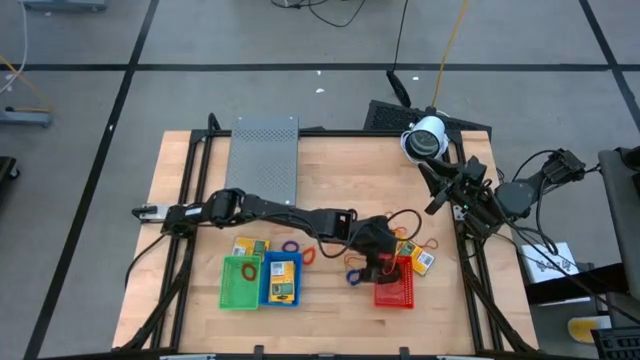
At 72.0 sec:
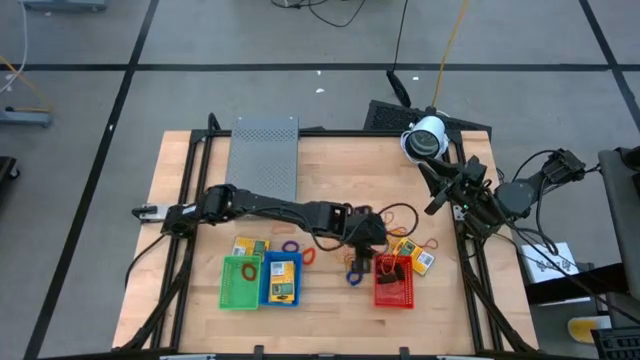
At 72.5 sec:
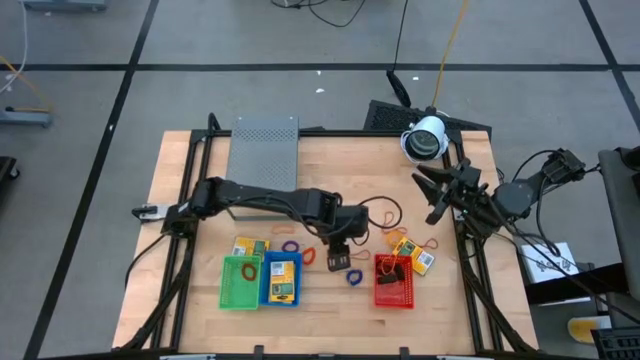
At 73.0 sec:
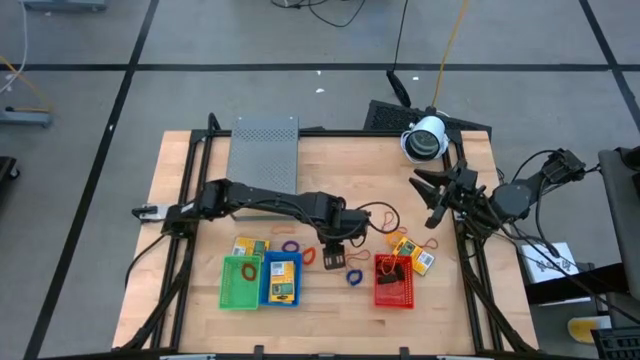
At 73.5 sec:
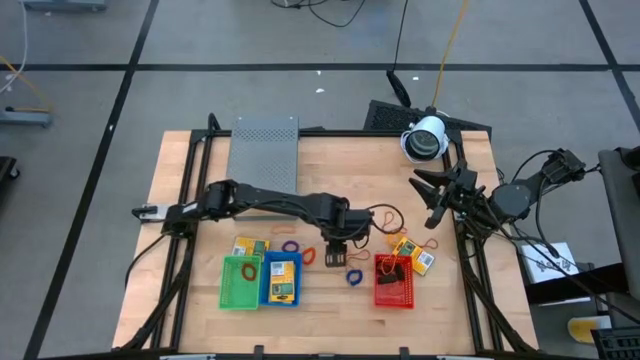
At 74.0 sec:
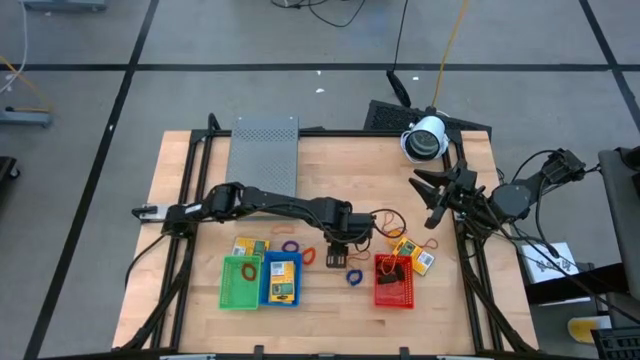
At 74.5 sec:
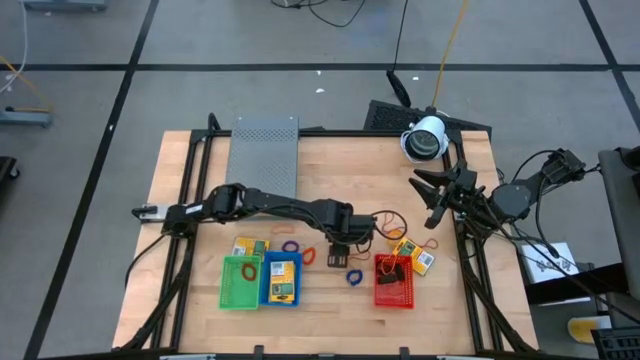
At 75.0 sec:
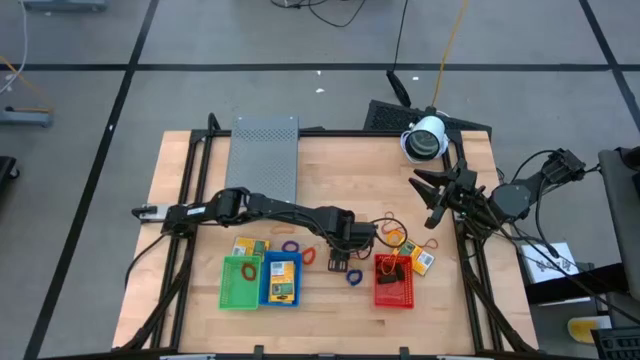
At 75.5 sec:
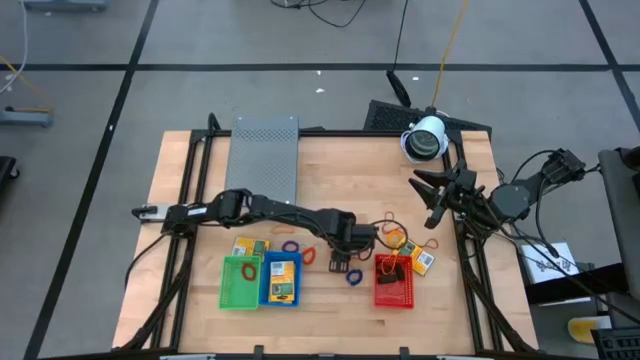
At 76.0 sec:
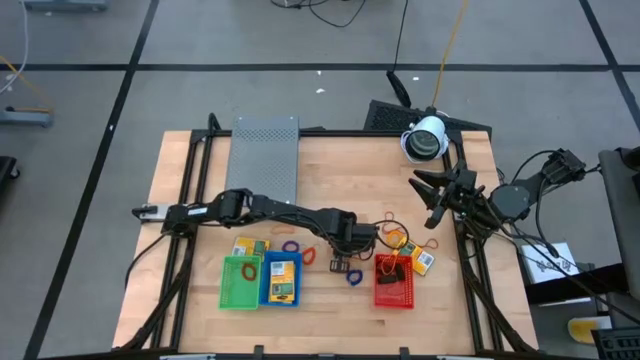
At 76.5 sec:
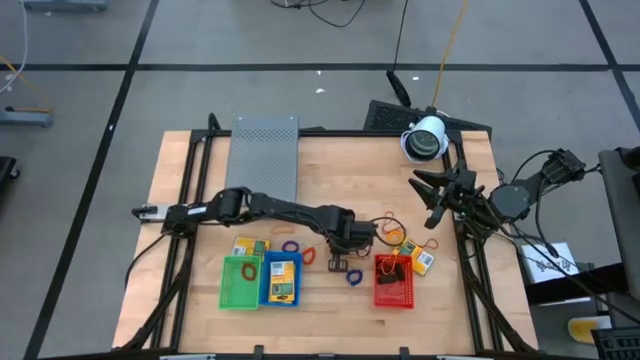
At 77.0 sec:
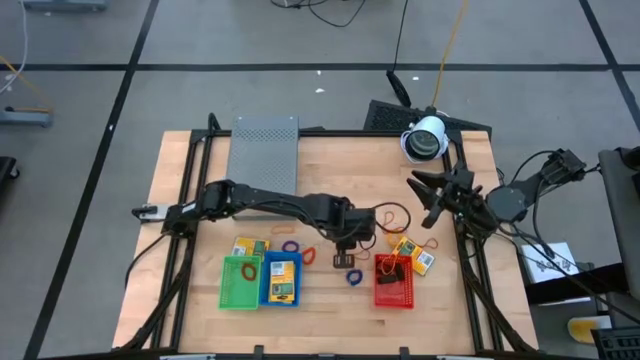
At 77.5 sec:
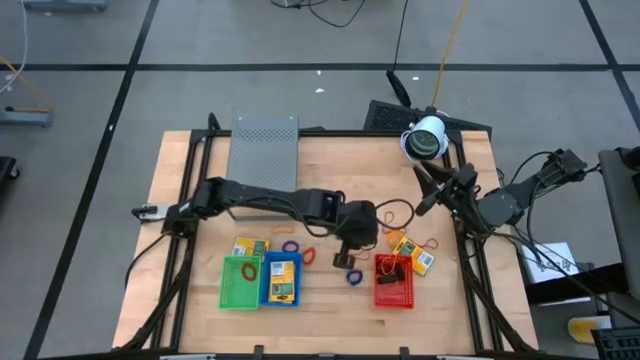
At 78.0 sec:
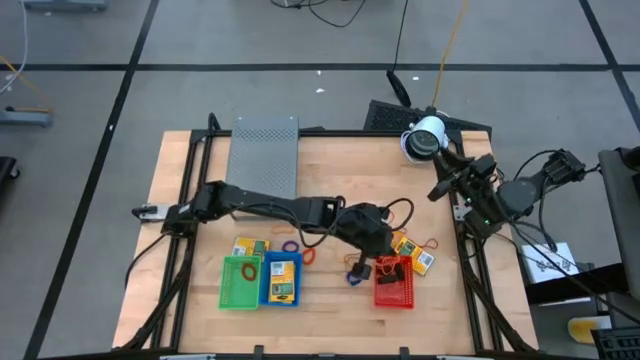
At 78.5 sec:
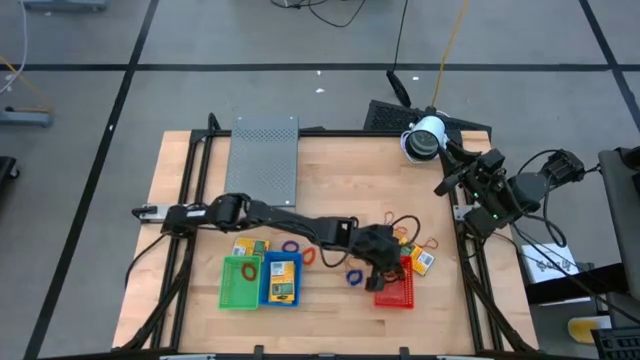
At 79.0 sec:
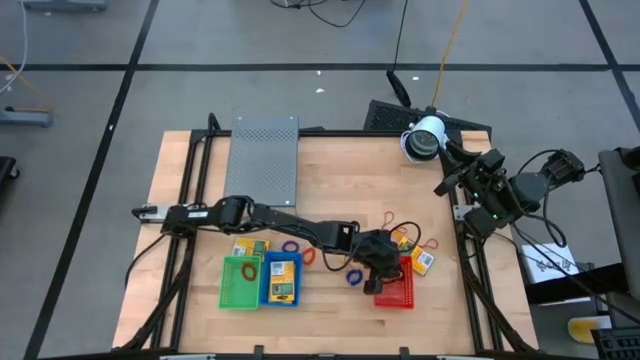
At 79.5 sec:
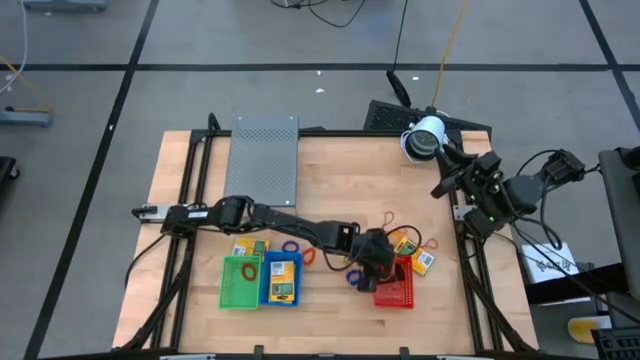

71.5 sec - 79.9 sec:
Task: Pick & Place Office Desk Supplies
Put the orange rubber band into the red bin

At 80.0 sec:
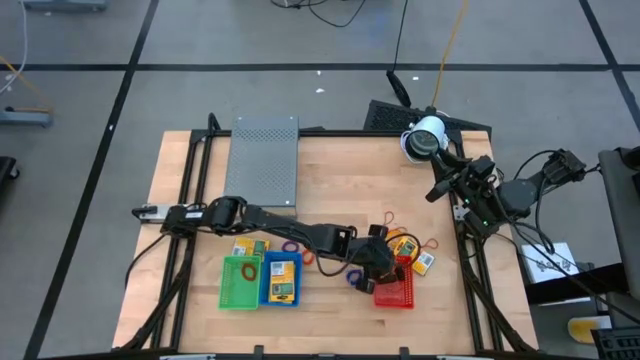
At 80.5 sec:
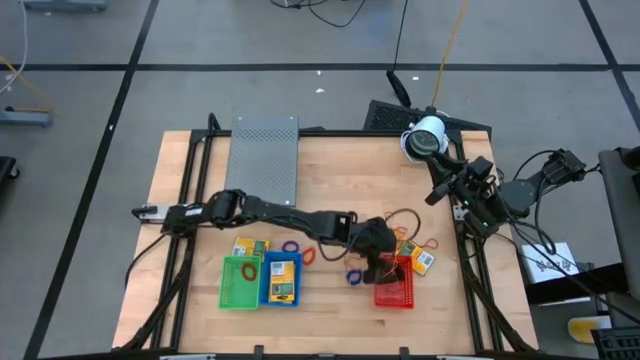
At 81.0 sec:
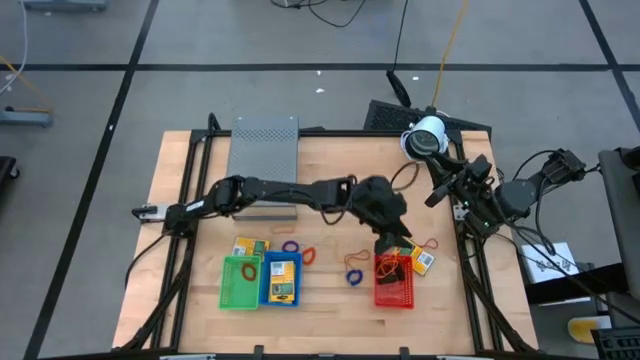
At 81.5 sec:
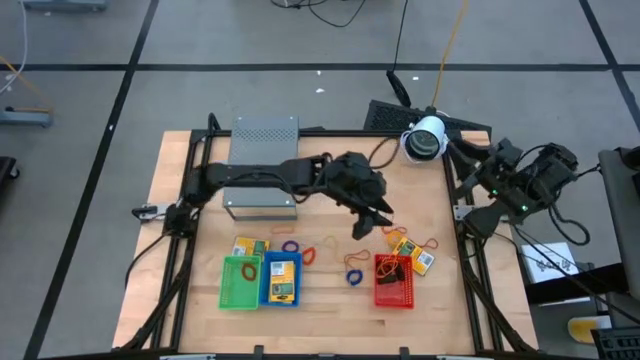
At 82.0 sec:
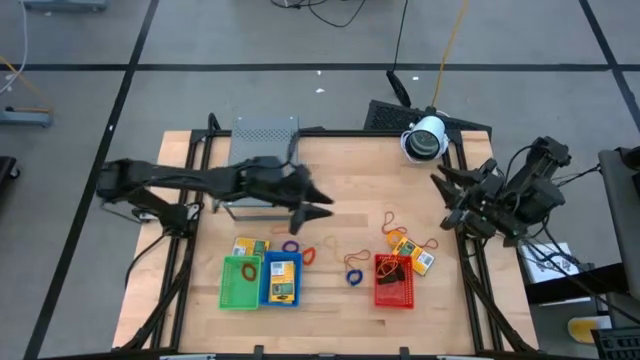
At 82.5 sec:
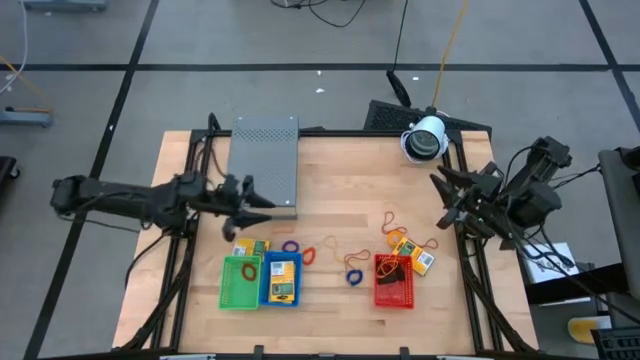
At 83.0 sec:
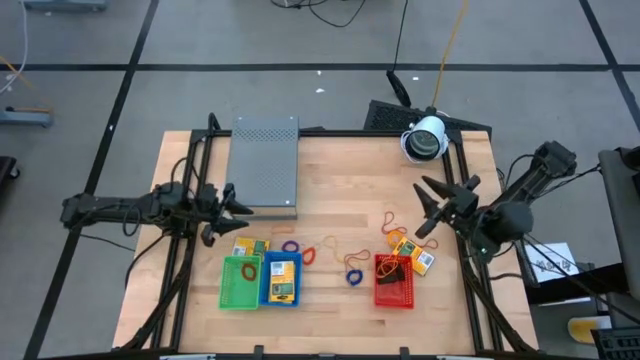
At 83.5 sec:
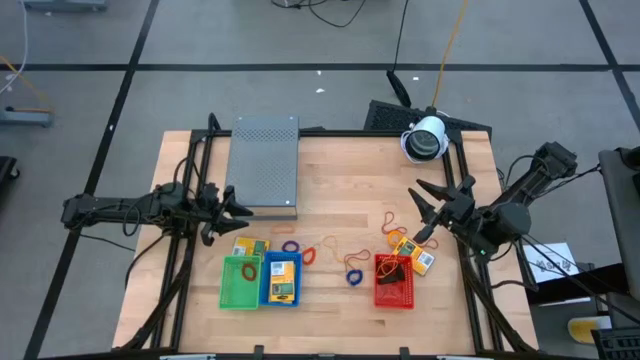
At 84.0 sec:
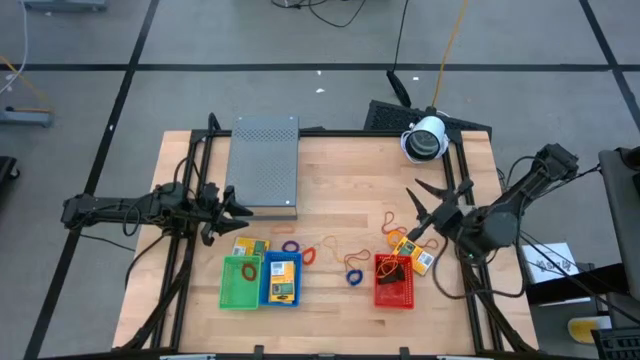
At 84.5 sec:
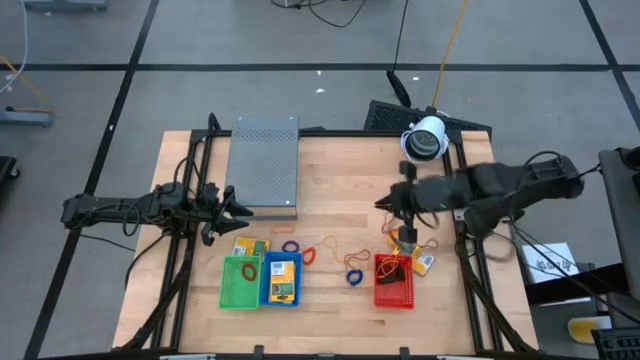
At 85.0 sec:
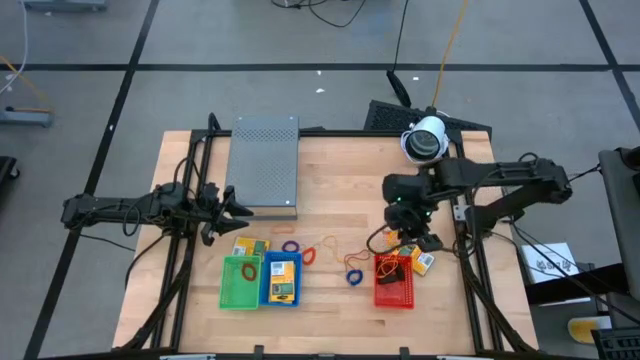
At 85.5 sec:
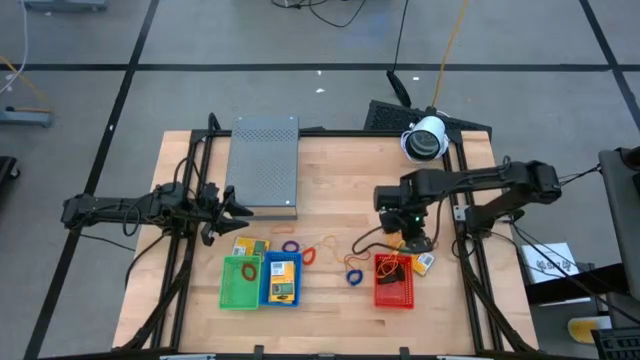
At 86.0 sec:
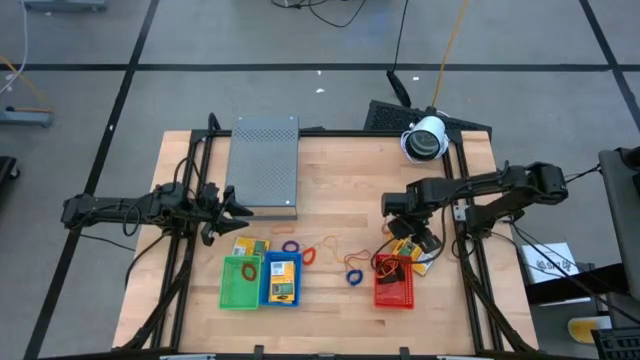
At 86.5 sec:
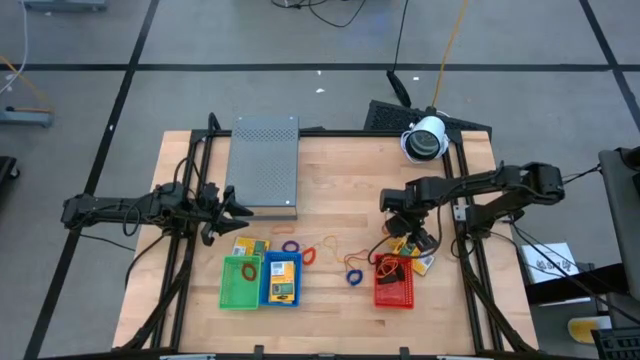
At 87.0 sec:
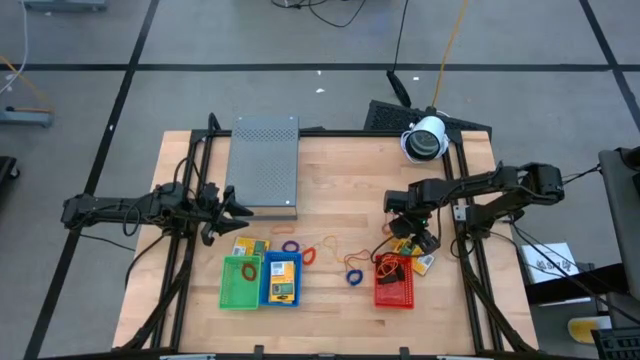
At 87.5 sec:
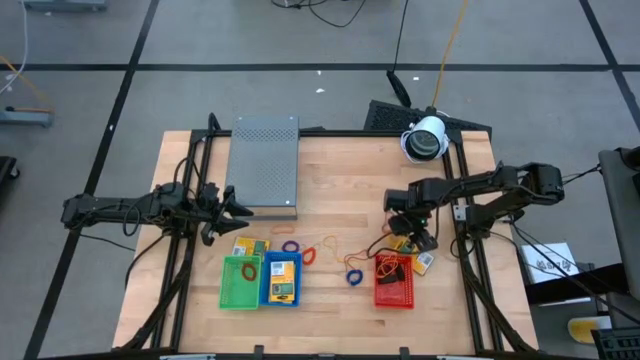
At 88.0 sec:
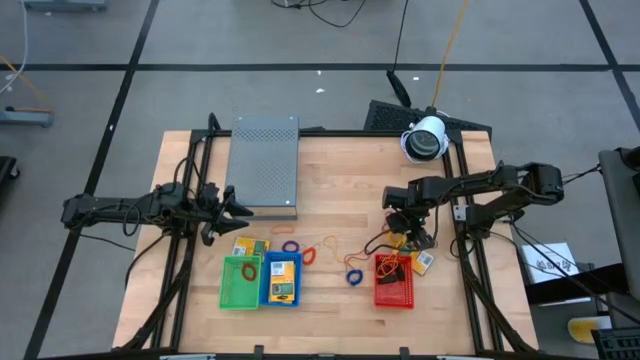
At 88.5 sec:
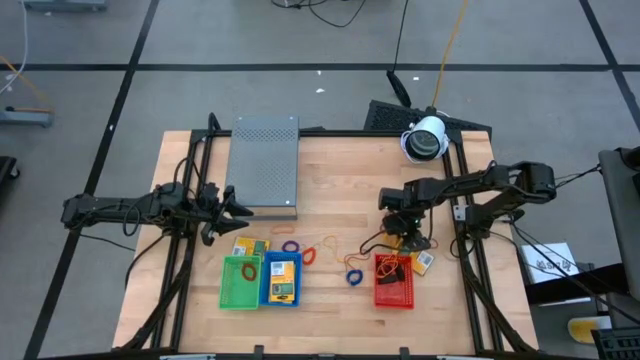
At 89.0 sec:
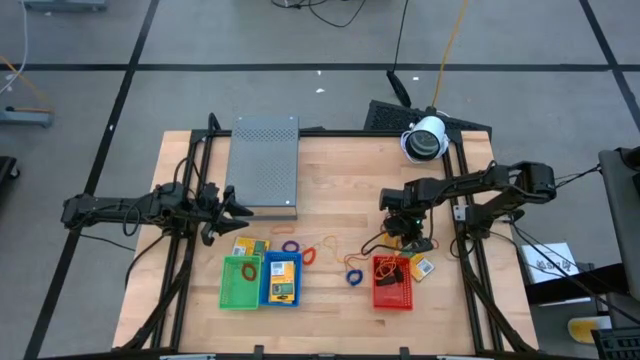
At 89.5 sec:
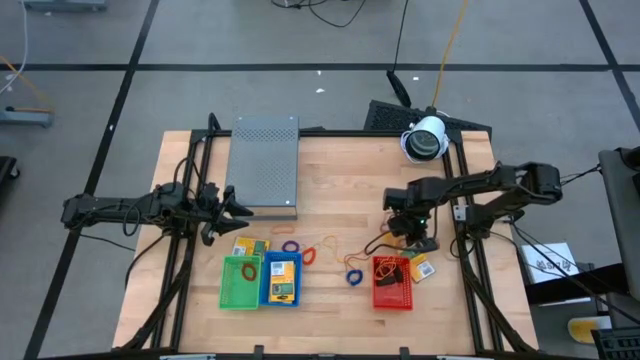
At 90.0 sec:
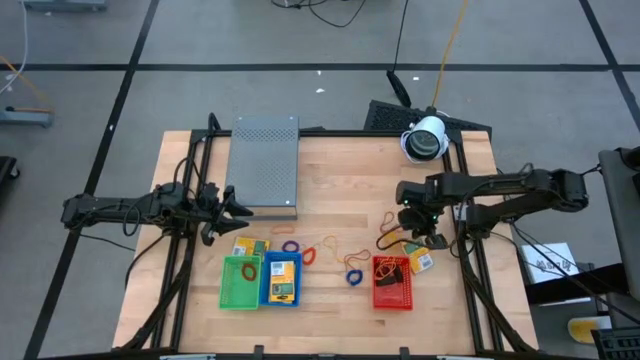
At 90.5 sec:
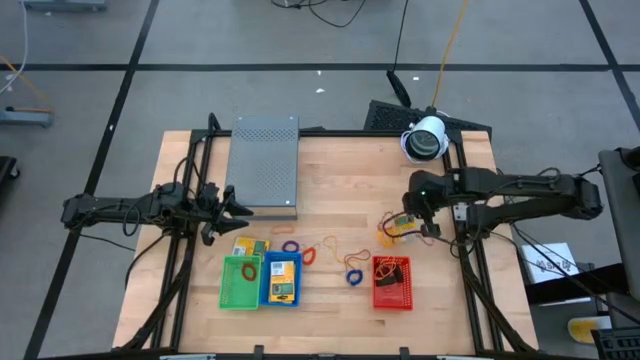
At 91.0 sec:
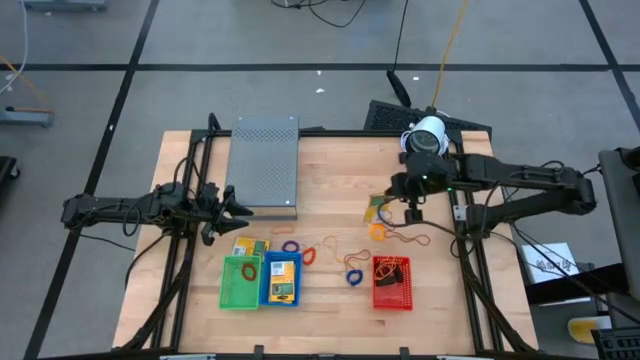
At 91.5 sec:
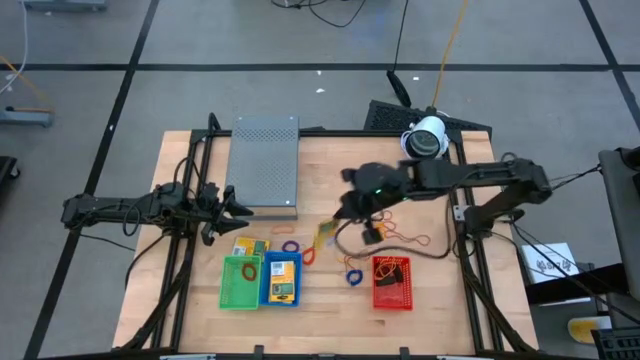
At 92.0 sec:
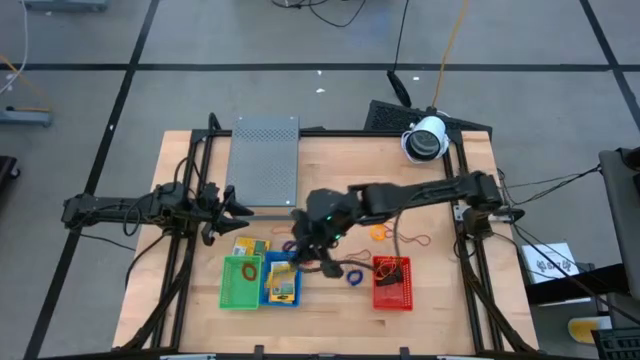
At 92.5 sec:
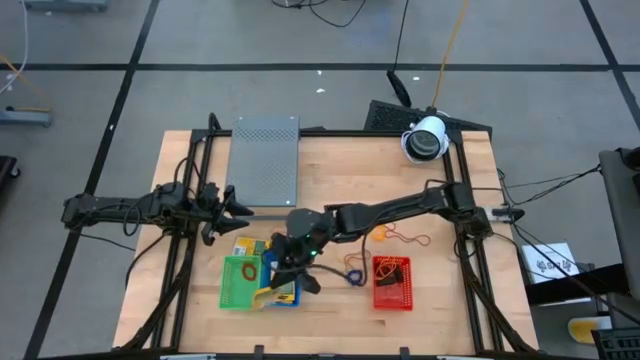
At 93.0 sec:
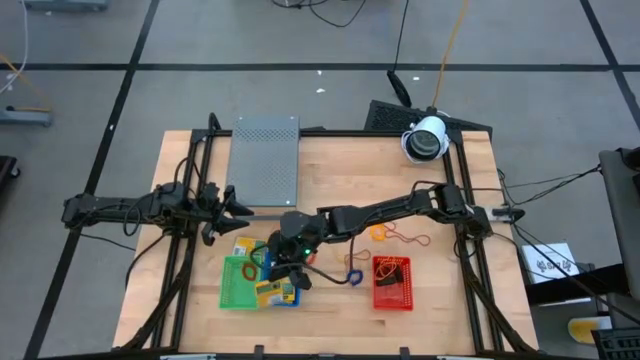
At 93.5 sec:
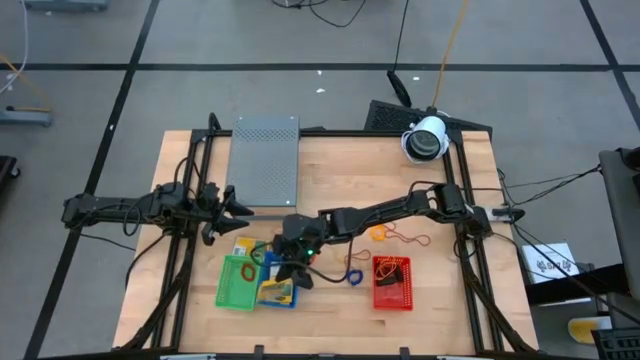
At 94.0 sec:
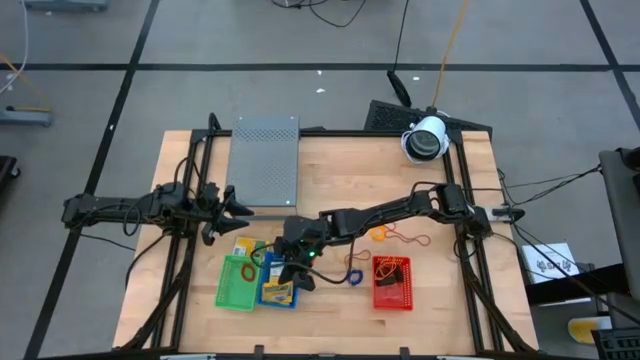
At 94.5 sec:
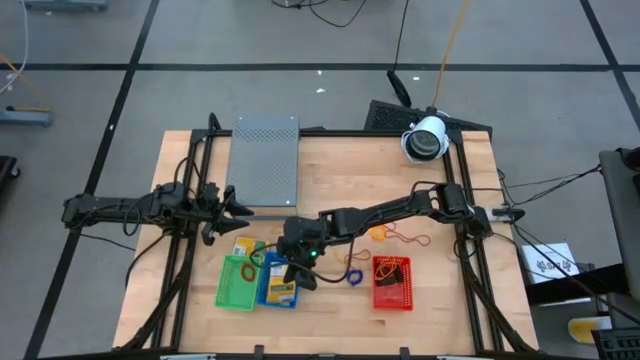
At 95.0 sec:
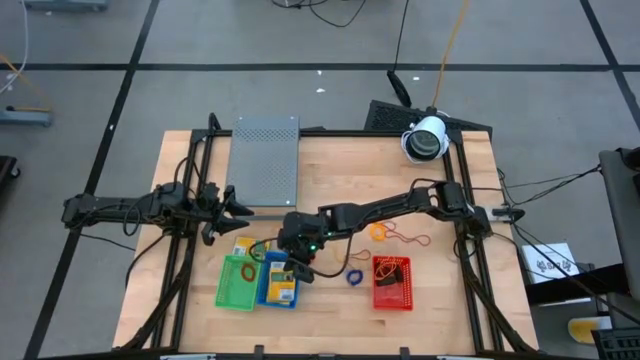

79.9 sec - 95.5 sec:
Put the crayon into the blue bin
